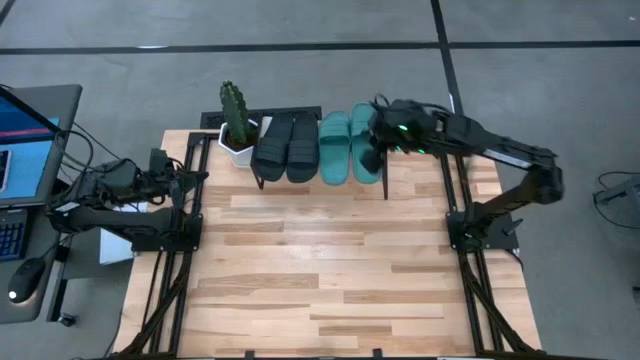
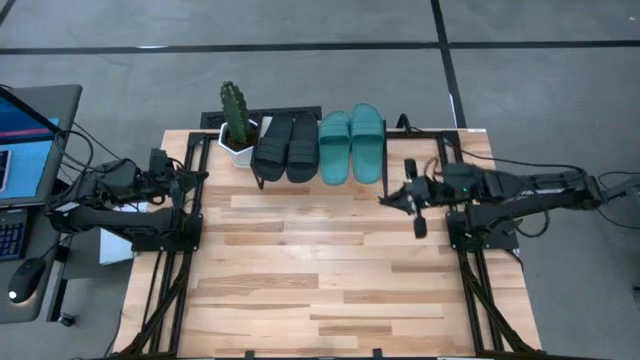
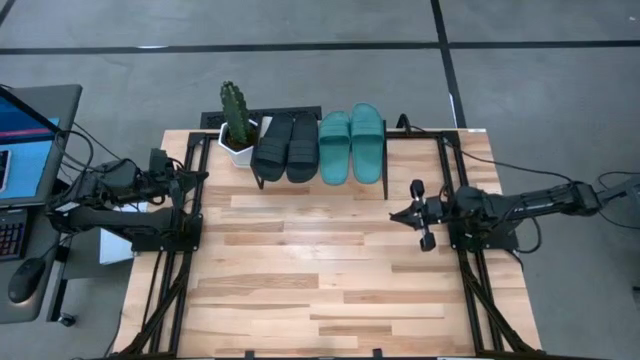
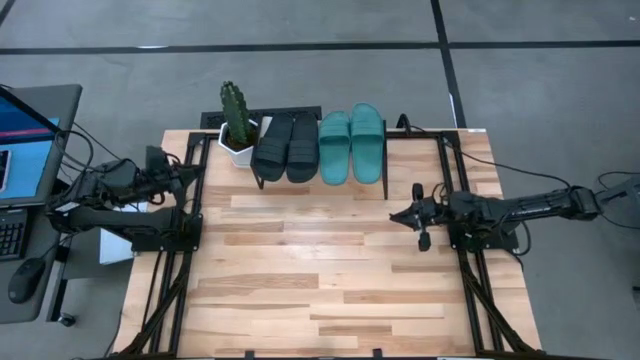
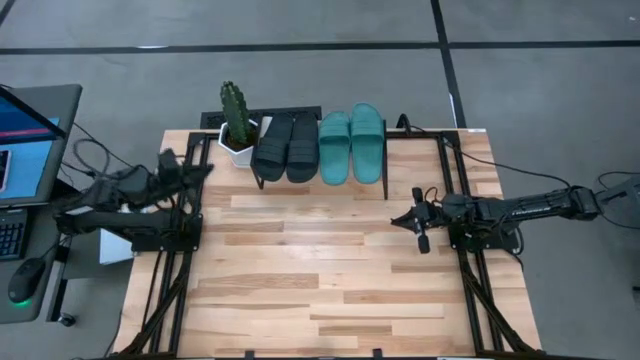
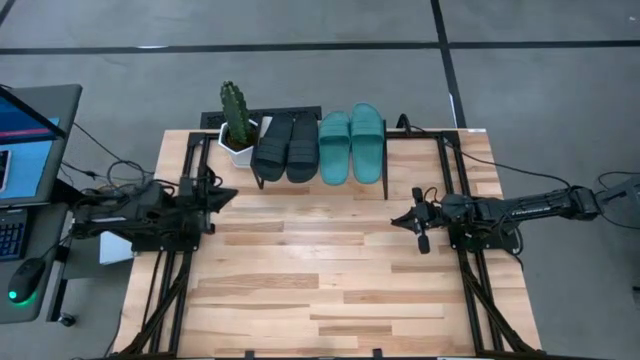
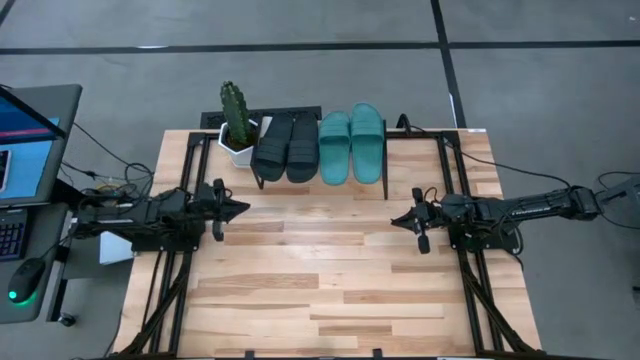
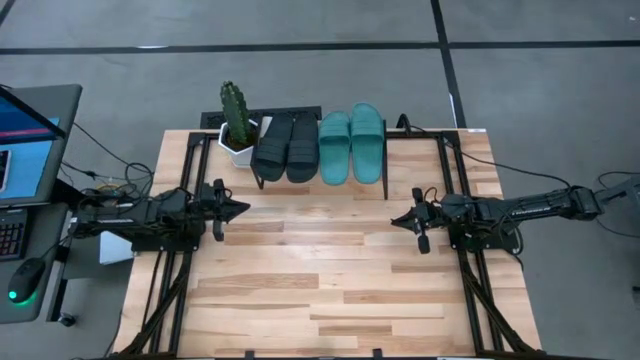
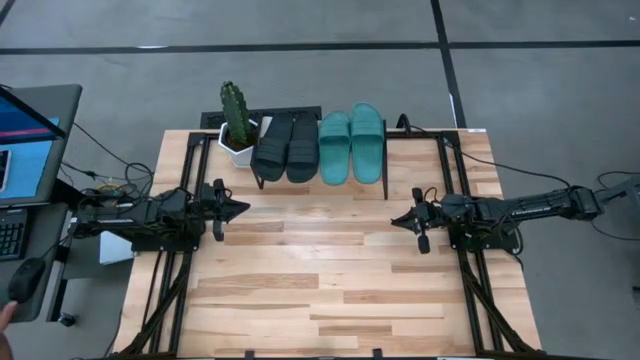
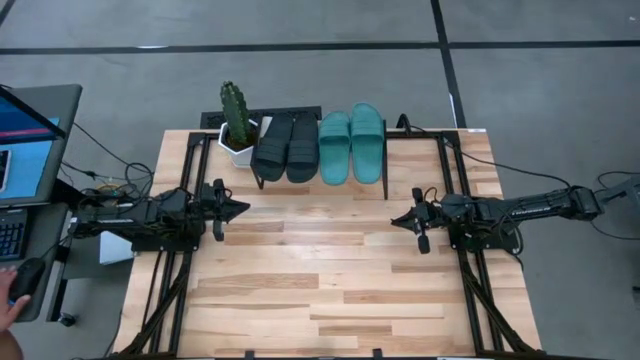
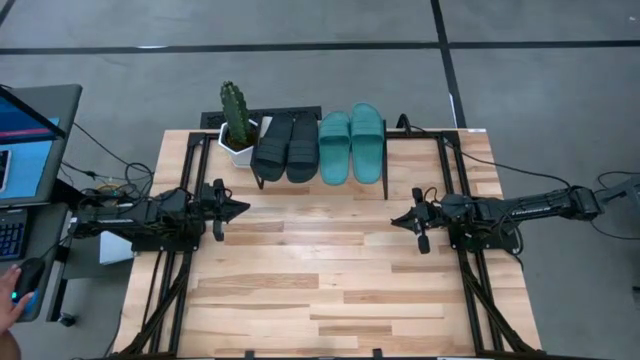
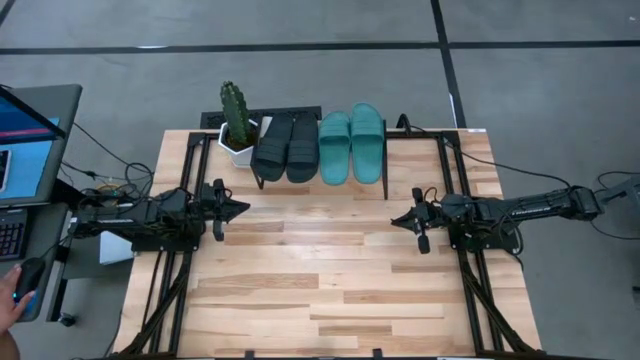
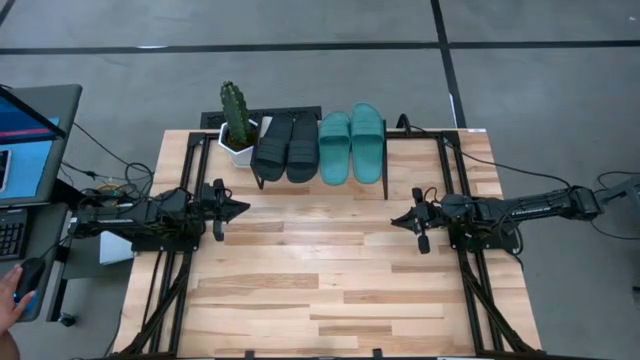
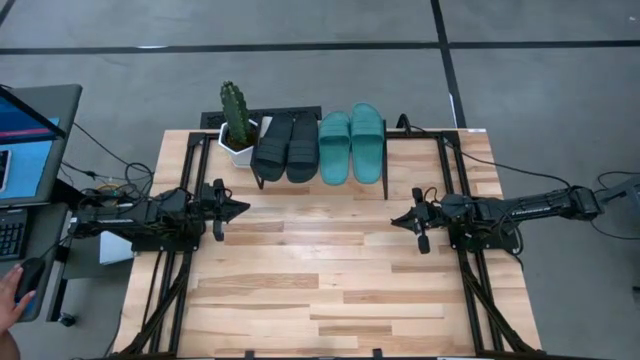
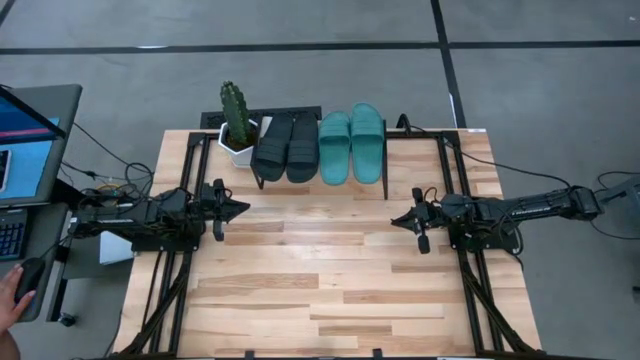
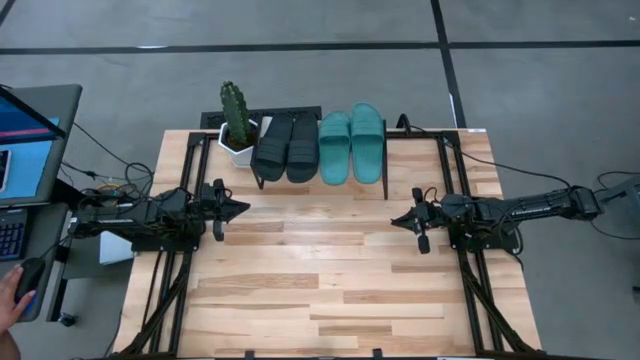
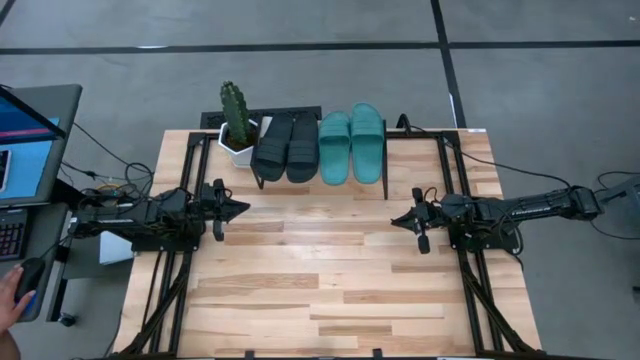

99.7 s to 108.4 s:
Task: Pick and place slides into the shelf
Return to Home Position

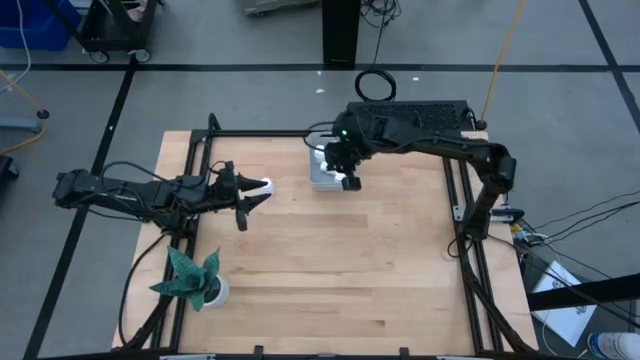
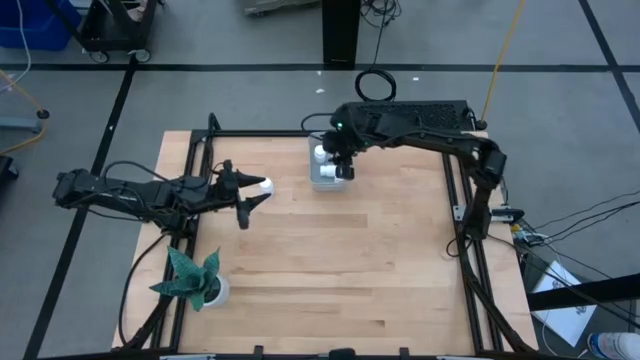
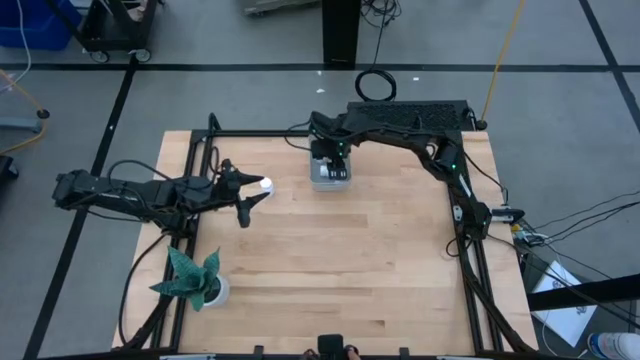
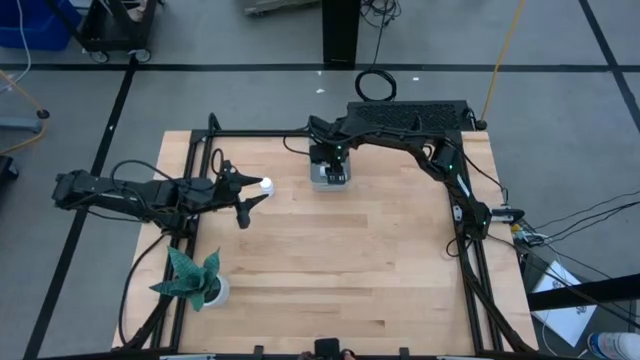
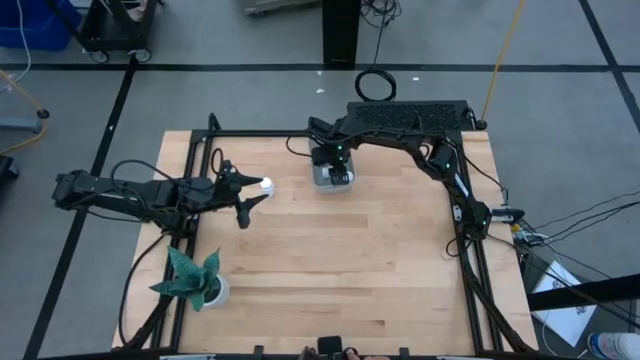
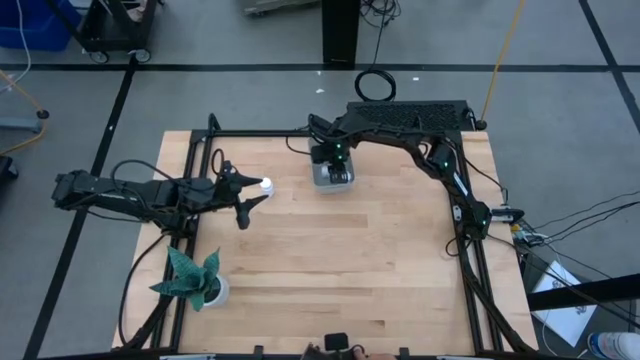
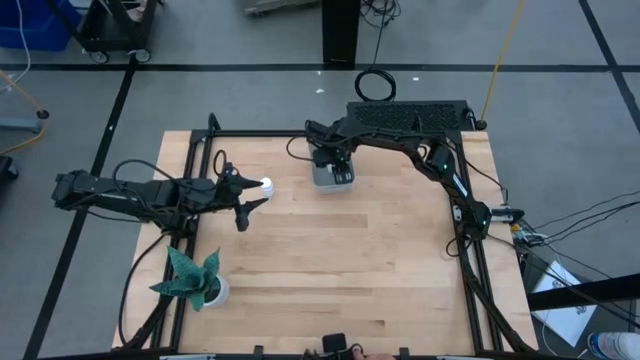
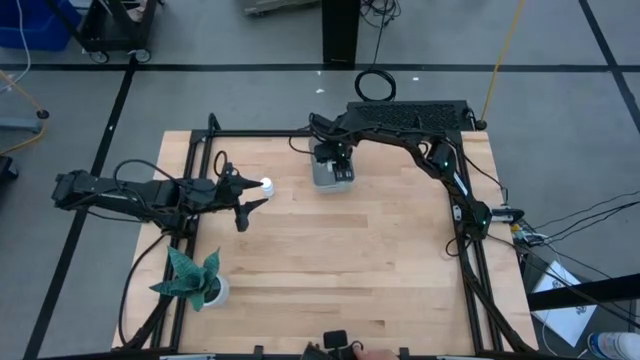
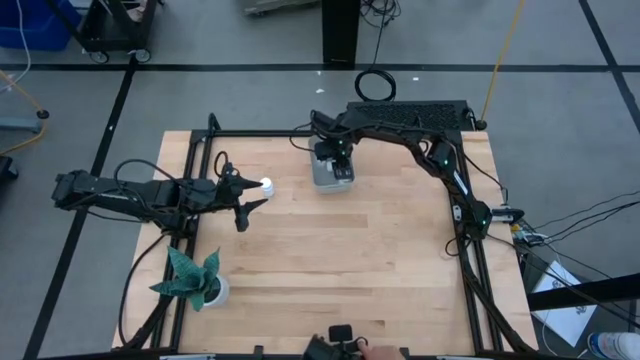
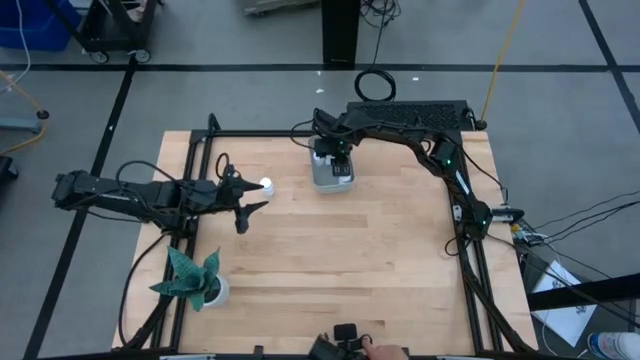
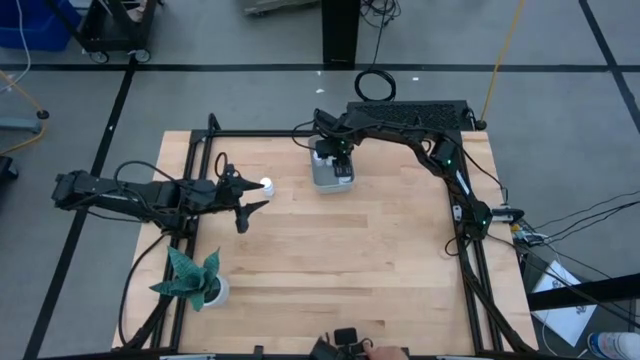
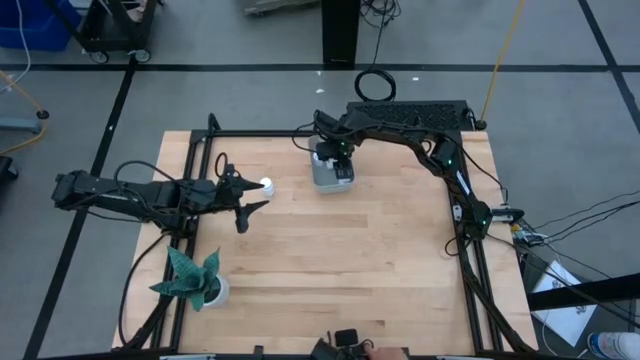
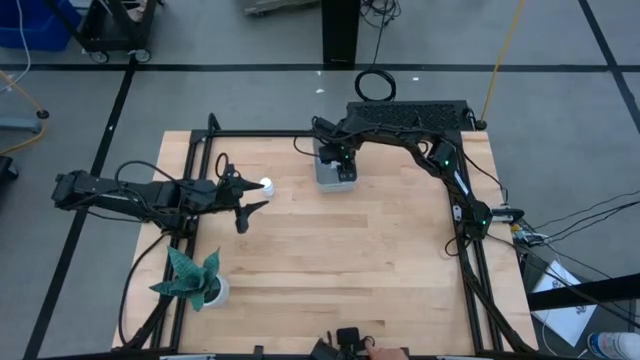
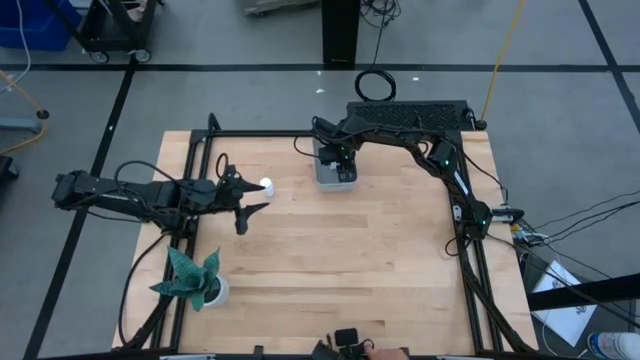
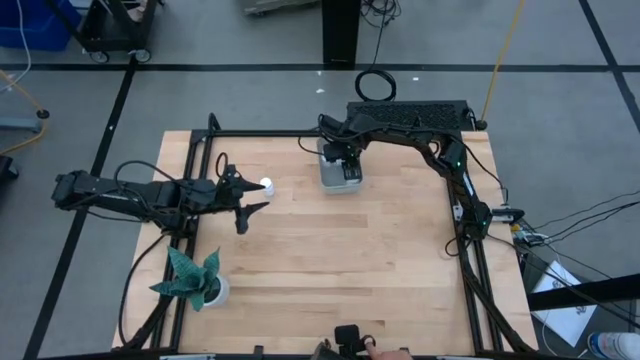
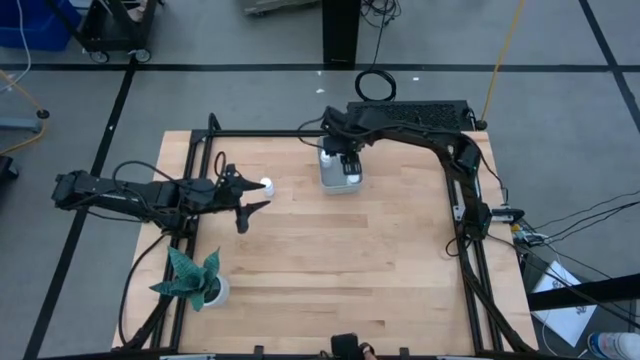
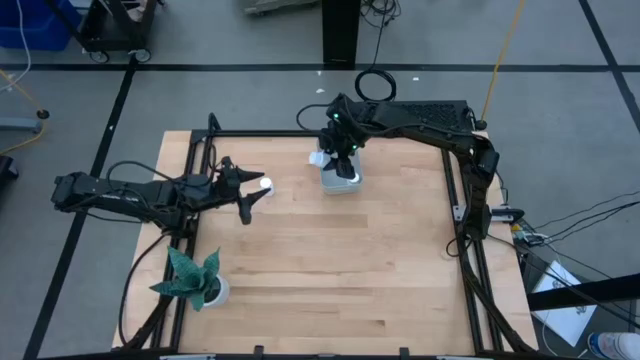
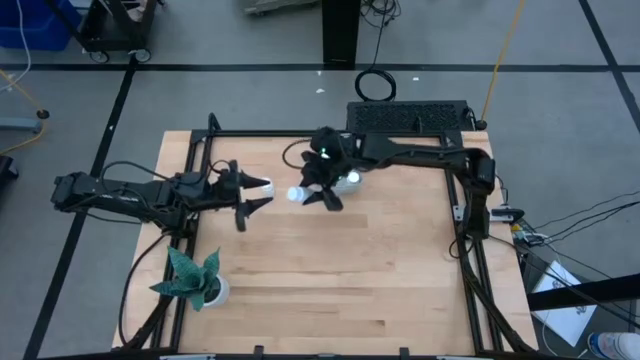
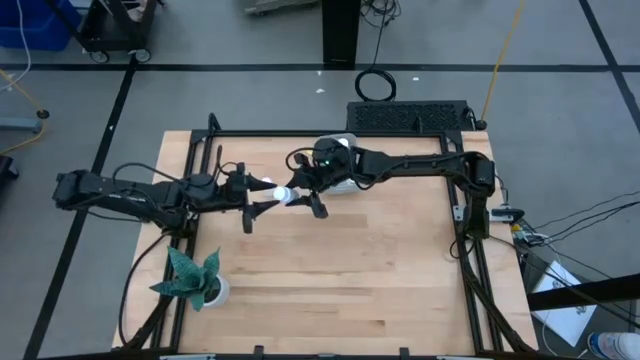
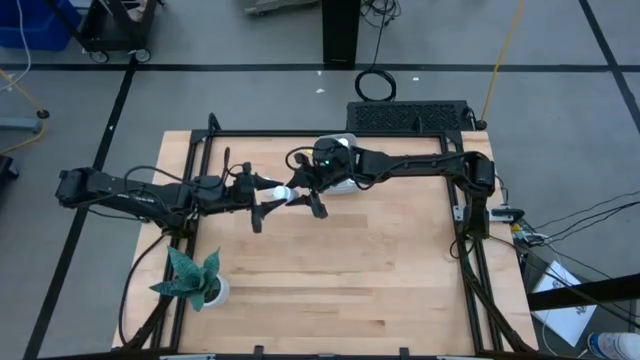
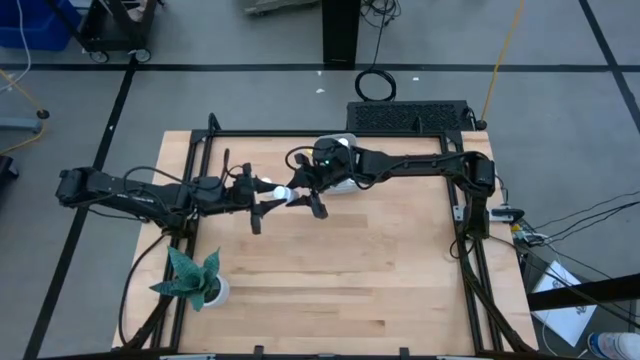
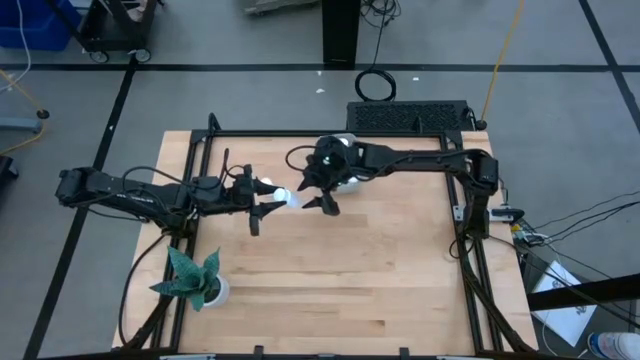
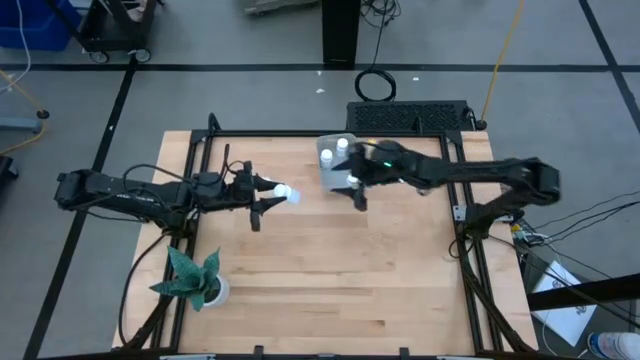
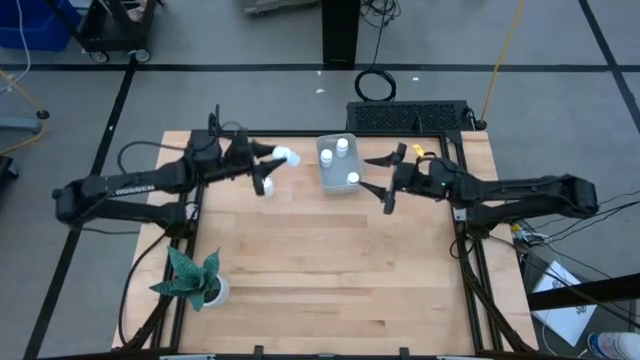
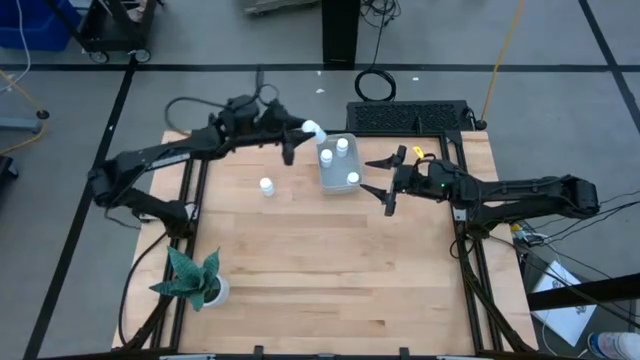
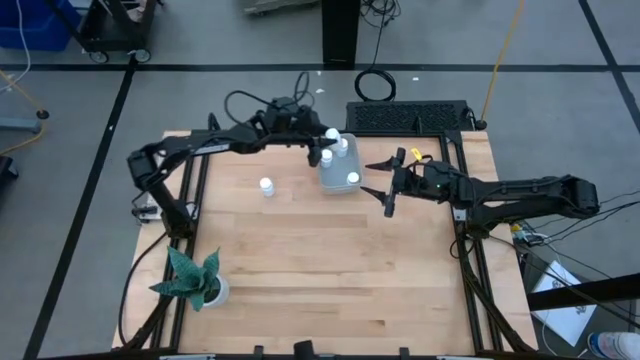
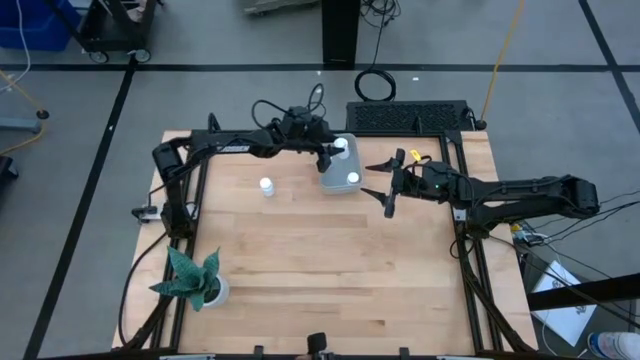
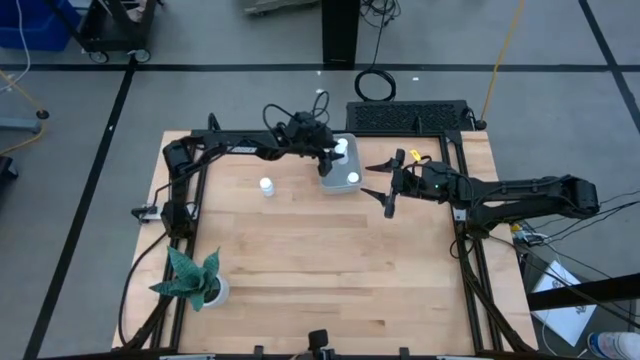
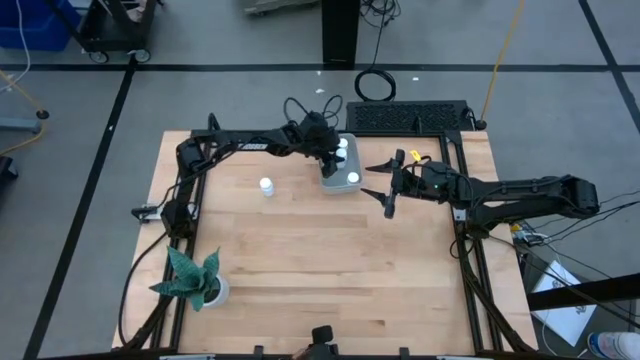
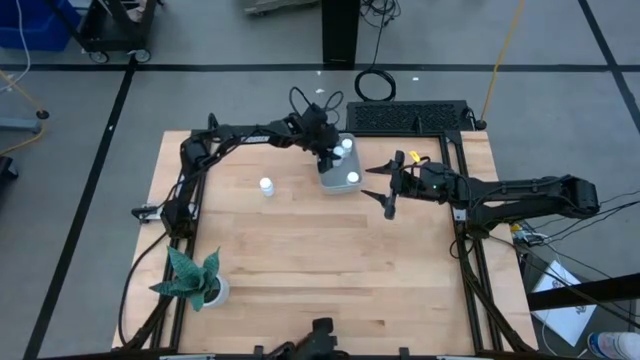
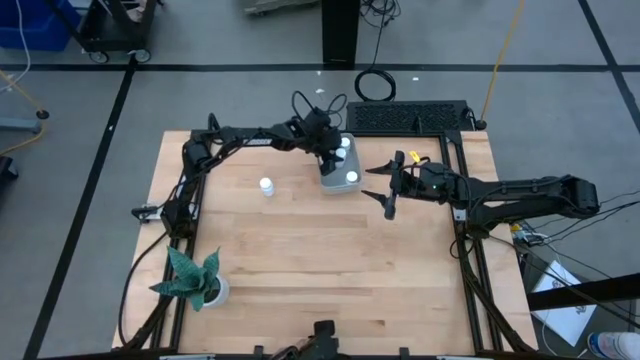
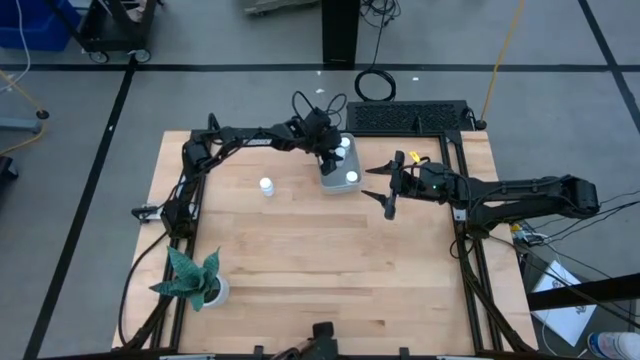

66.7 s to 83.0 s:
Task: Pick and place pill bottles into a basket
Adjust the white medicine bottle into the gray bin
